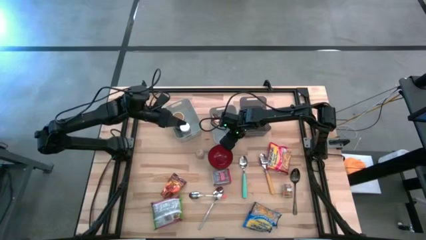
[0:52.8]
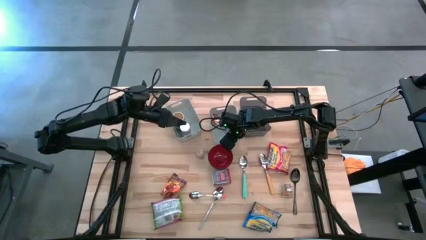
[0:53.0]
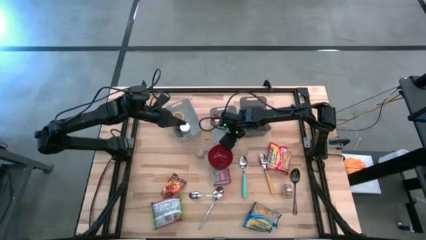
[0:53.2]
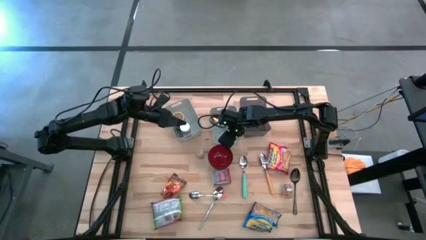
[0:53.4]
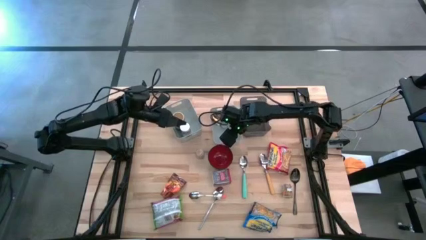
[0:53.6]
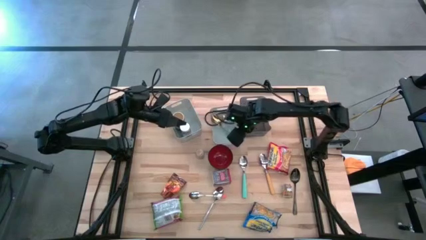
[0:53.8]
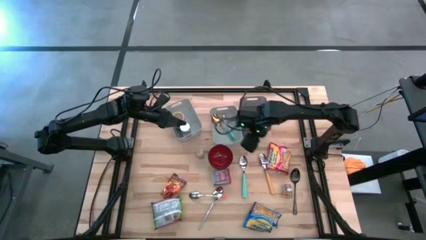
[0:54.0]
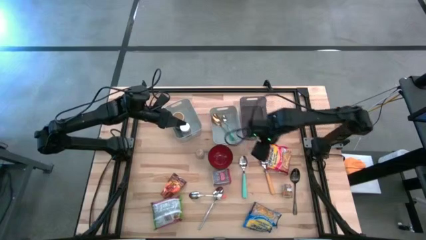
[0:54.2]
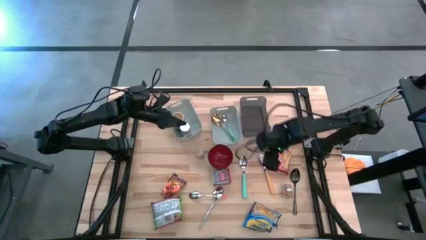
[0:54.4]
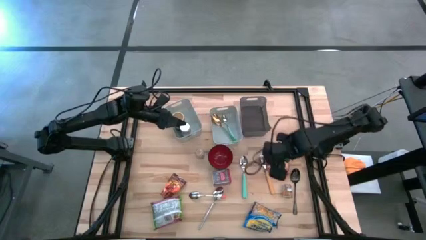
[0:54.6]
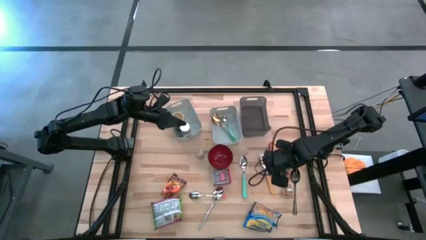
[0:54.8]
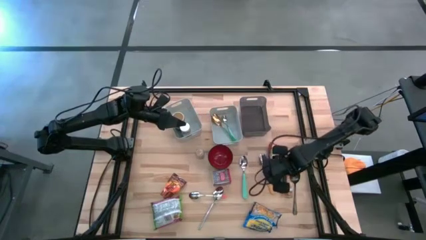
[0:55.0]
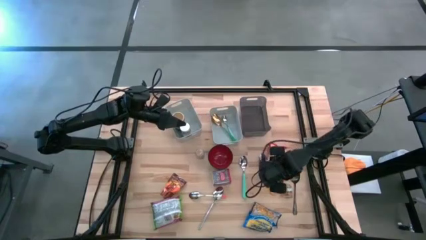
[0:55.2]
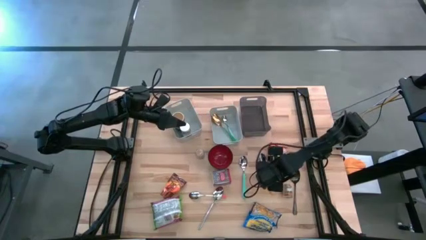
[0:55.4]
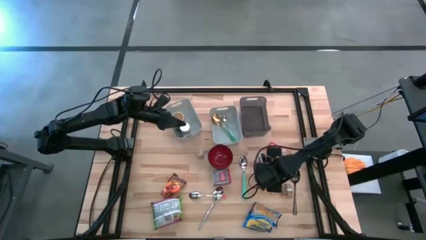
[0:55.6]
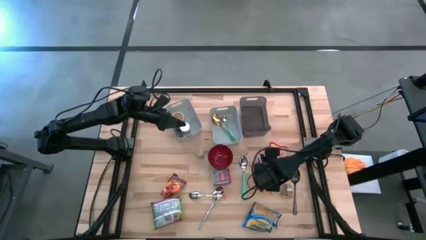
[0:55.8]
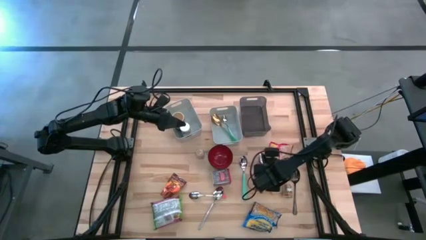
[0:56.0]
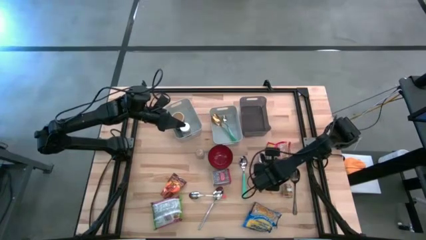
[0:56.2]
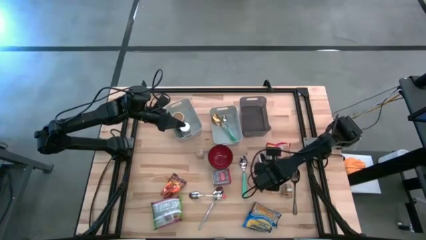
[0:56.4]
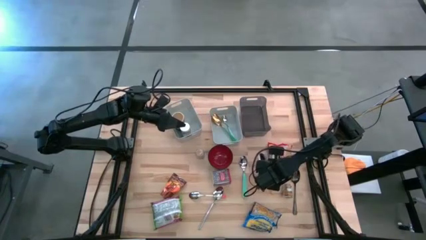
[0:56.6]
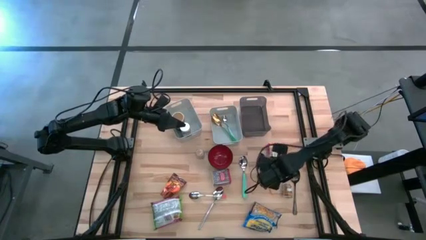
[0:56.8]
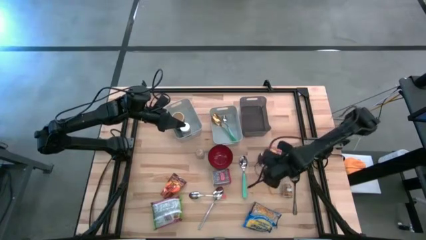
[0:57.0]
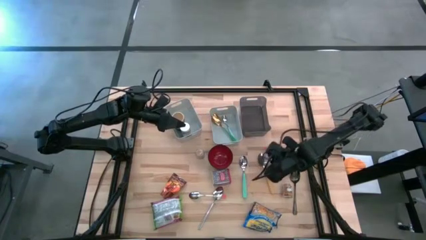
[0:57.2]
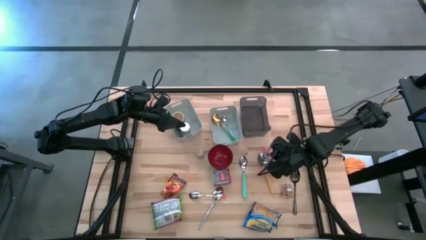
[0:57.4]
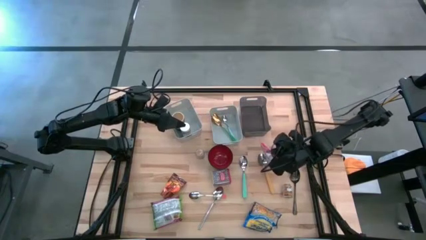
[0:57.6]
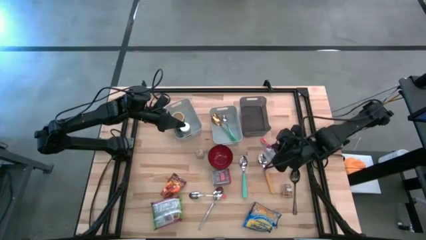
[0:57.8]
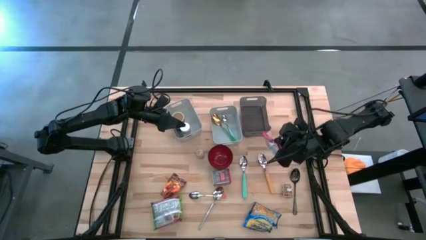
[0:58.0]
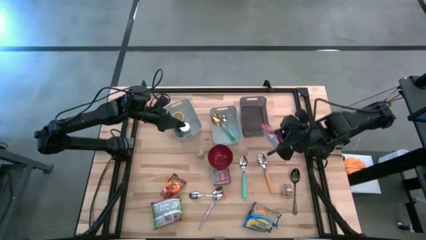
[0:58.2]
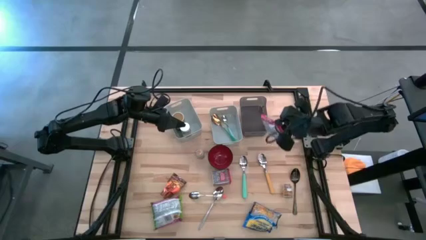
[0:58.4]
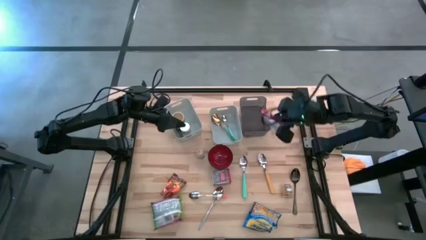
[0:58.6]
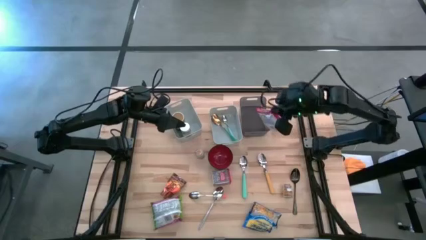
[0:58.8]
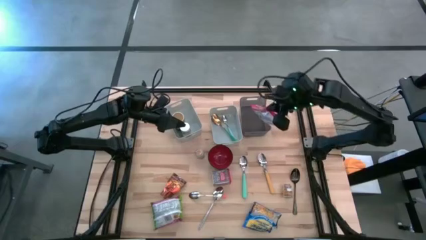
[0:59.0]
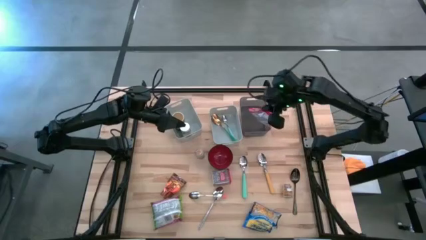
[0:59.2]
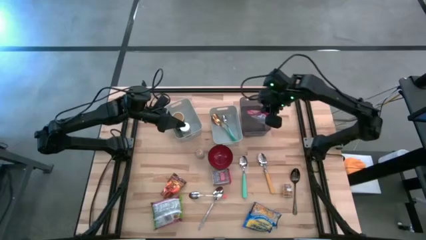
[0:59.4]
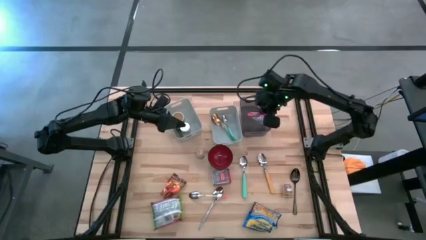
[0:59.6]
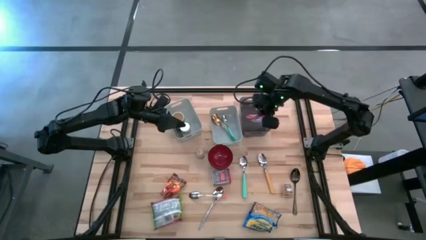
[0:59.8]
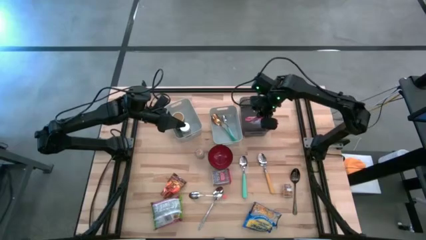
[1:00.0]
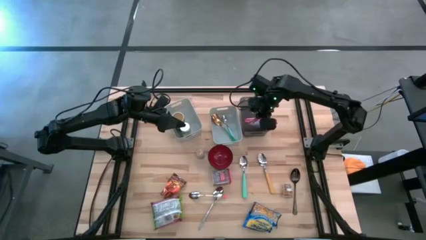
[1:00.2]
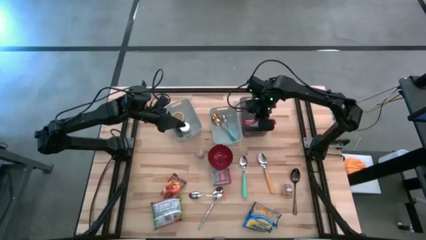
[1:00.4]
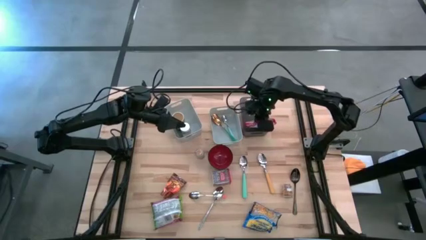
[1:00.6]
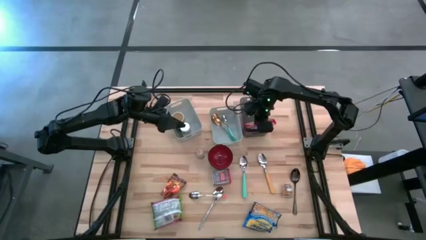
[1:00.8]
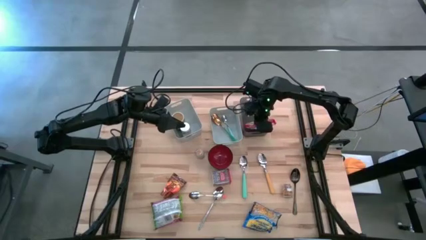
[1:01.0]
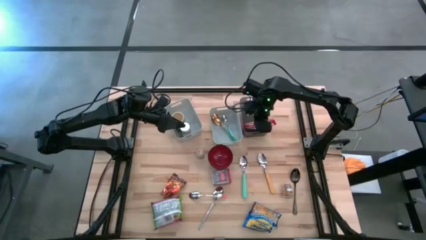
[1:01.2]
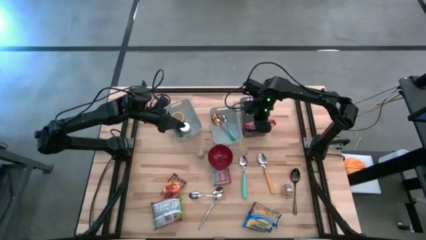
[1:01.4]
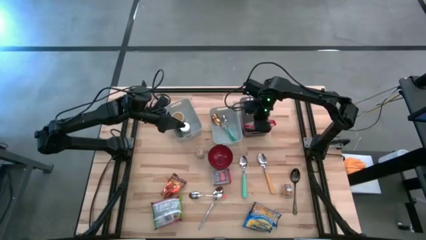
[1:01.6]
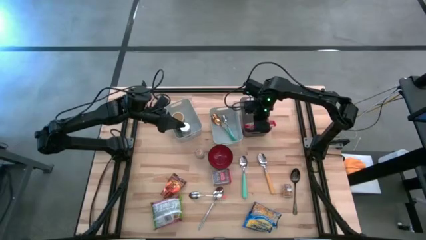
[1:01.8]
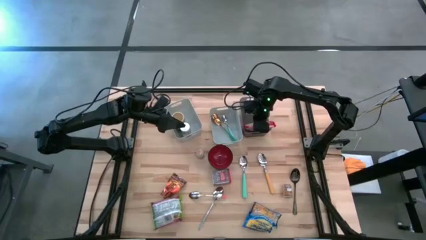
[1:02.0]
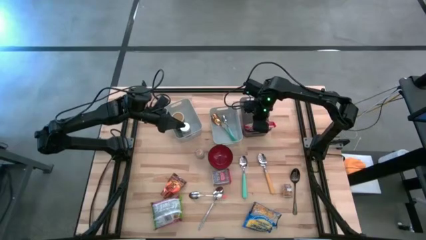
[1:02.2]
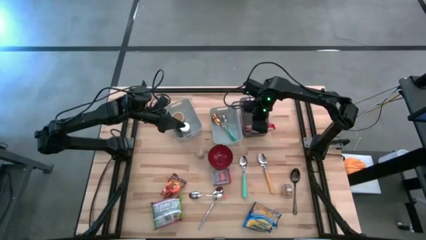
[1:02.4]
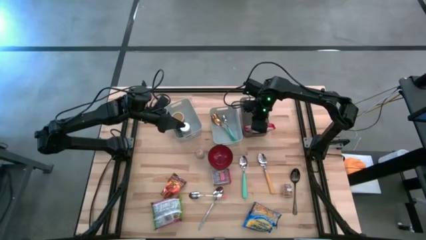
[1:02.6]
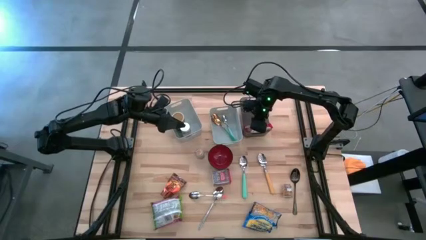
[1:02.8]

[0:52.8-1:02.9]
Put the red noodle pack into the black bin

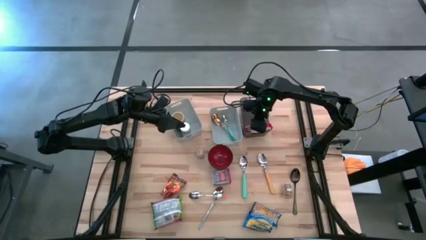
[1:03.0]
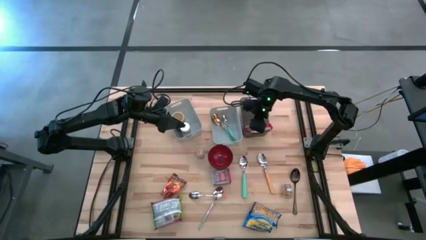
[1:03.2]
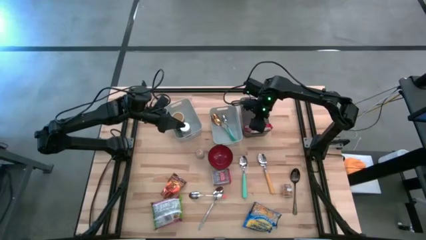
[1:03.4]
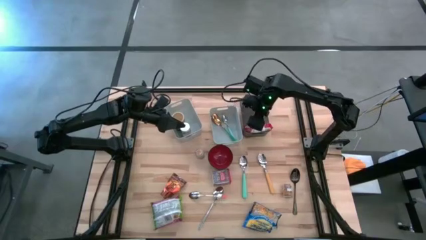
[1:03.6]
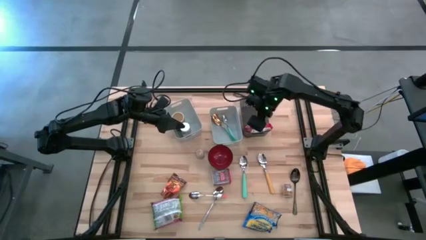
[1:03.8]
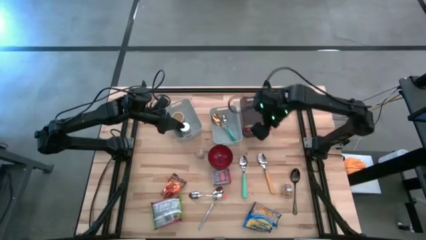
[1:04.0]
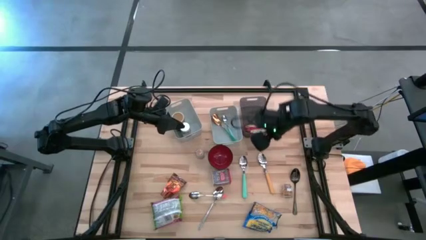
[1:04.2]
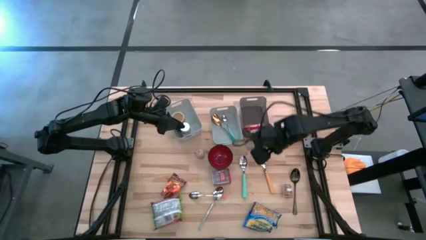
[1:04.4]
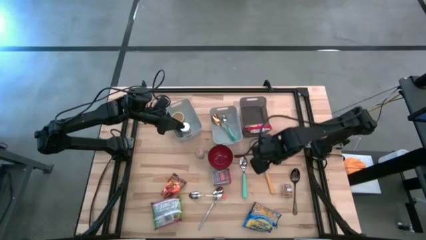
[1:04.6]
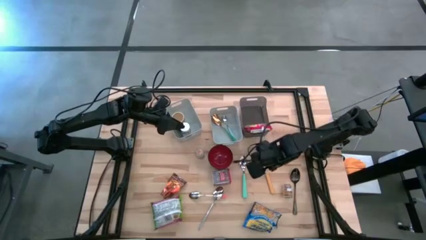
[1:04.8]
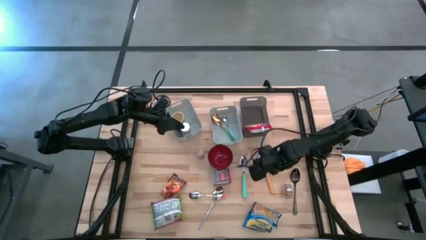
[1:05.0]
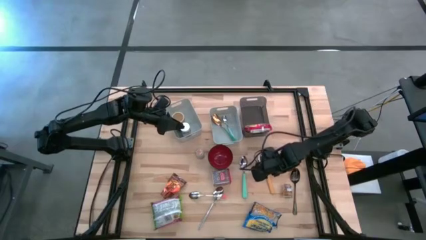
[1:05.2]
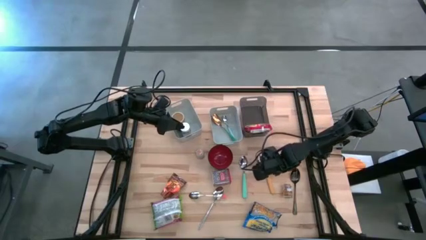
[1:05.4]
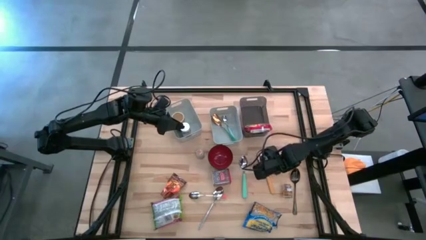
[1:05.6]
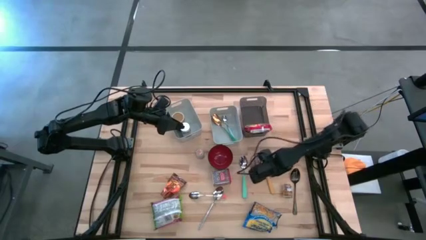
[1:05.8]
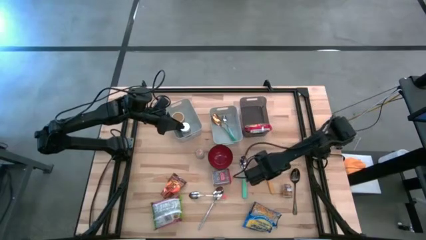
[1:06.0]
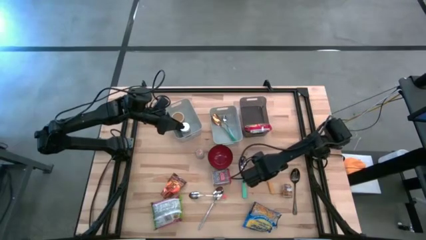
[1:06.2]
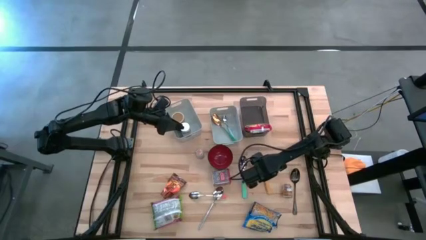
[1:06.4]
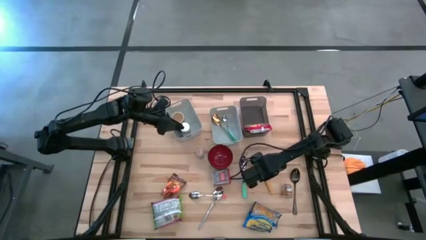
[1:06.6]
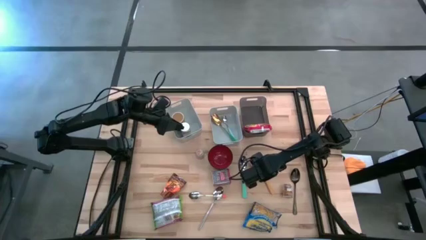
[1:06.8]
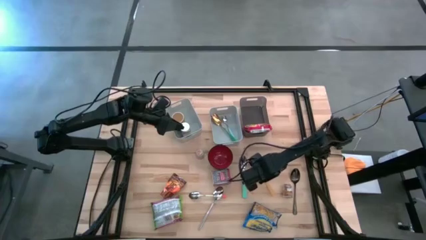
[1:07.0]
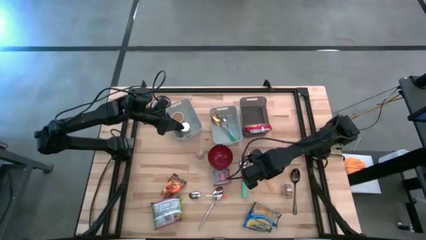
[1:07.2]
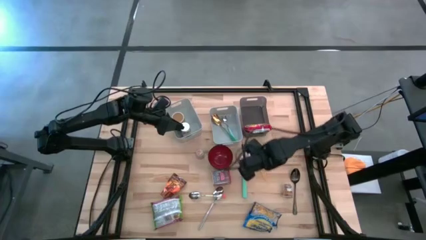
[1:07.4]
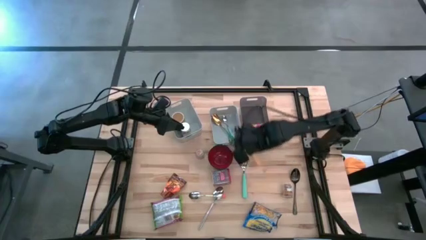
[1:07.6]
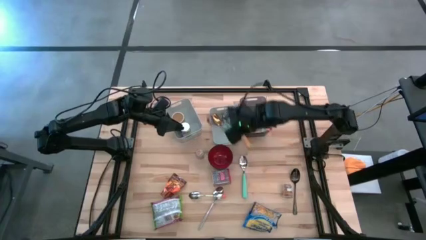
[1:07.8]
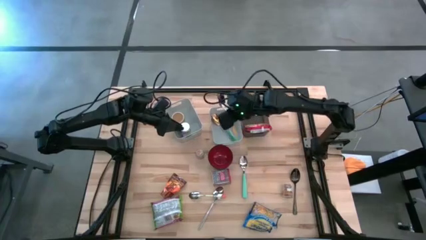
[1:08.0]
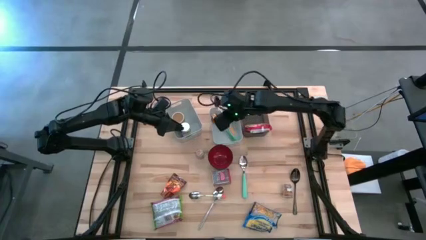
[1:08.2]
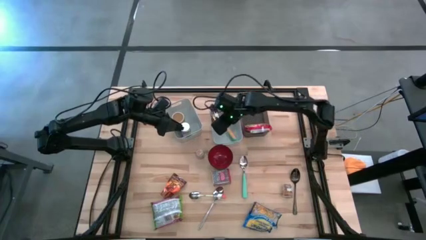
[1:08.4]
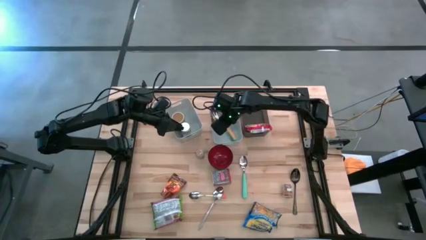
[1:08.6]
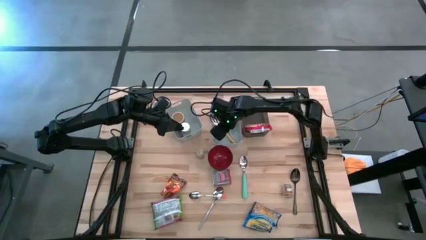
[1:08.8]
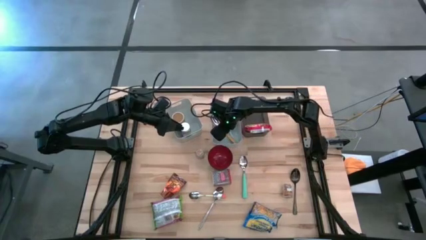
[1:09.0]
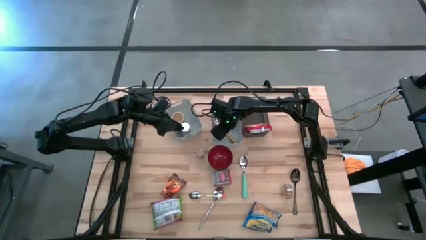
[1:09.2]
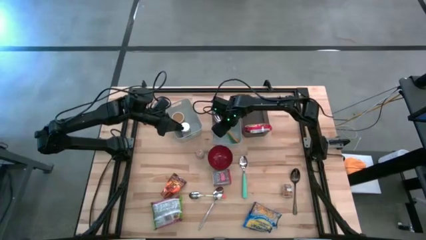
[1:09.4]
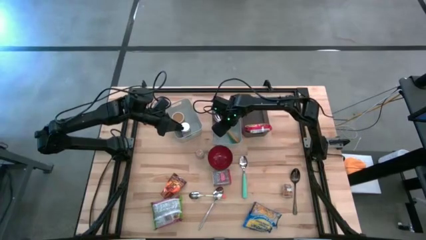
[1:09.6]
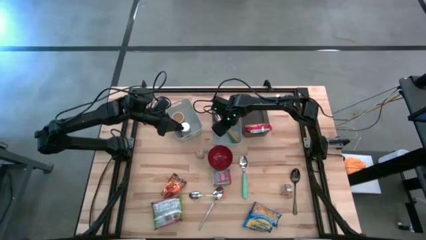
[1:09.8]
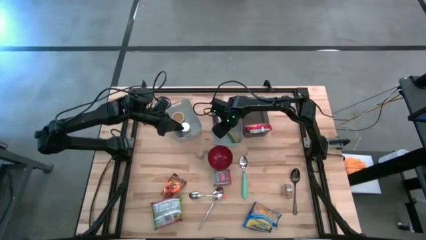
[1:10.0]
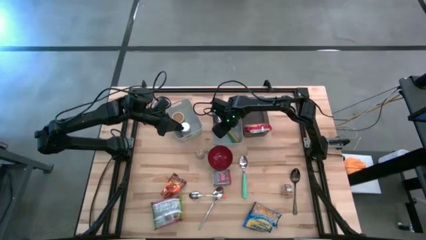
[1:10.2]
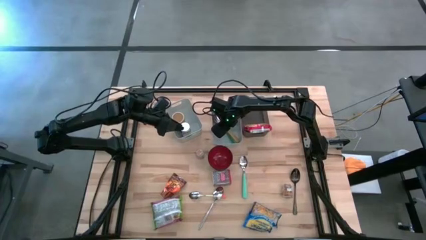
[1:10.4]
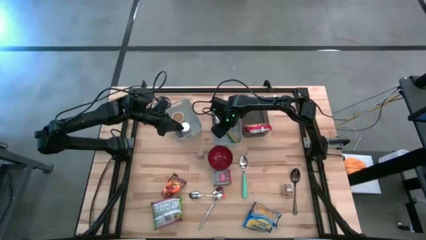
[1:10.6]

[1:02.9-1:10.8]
Put the yellow spoon into the right white bin
